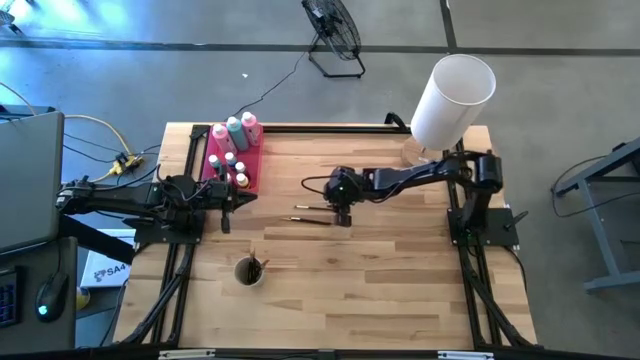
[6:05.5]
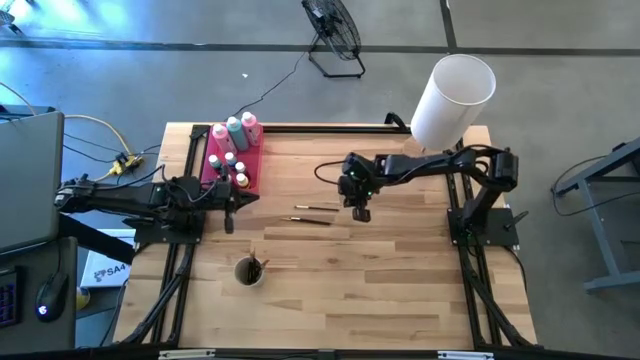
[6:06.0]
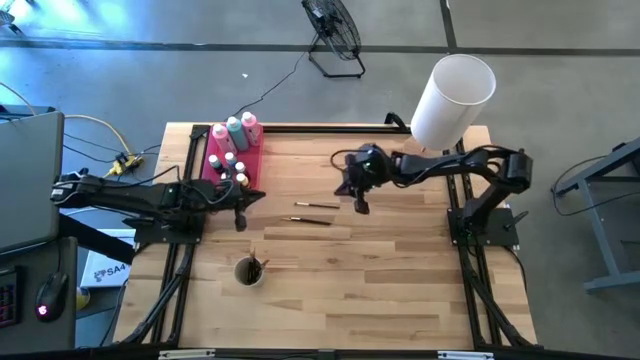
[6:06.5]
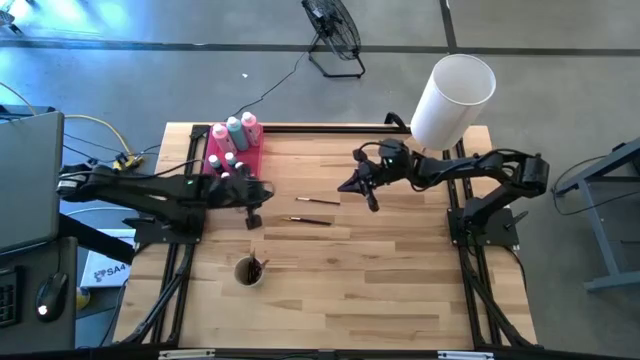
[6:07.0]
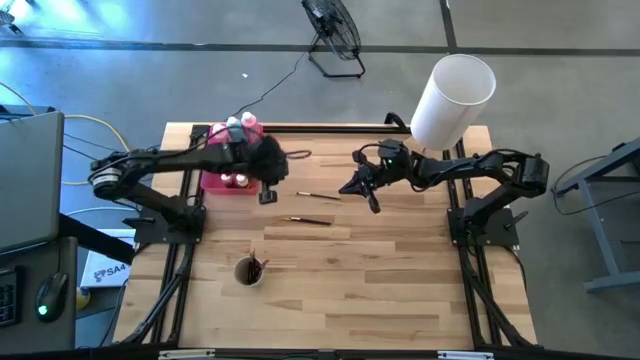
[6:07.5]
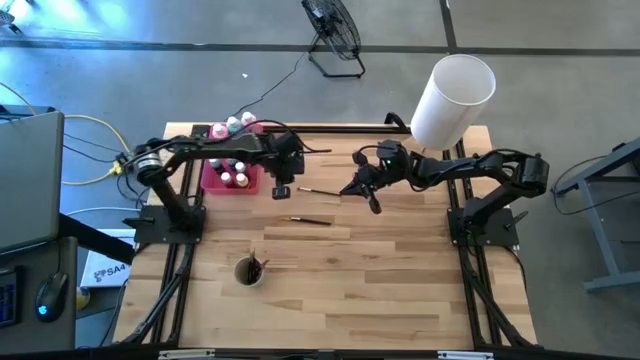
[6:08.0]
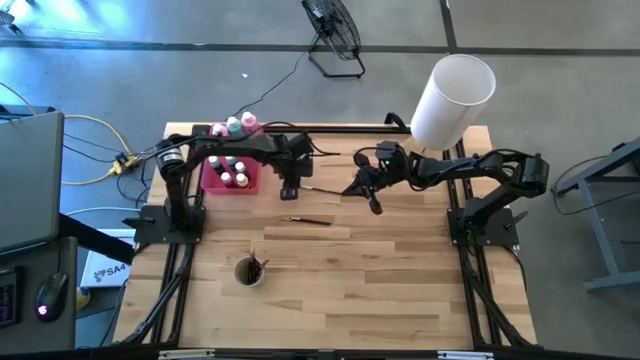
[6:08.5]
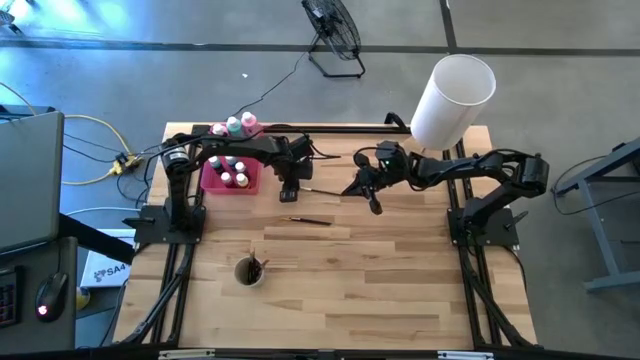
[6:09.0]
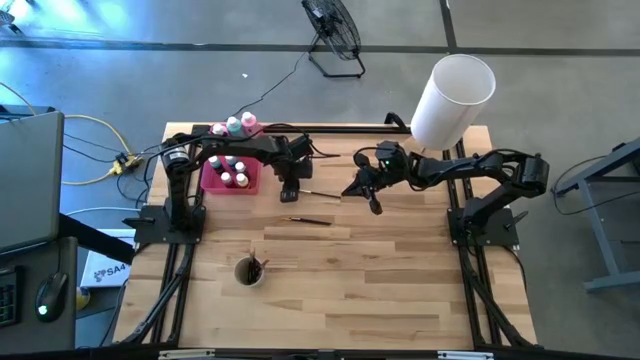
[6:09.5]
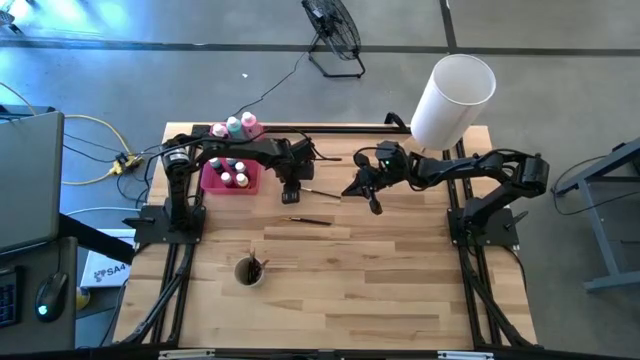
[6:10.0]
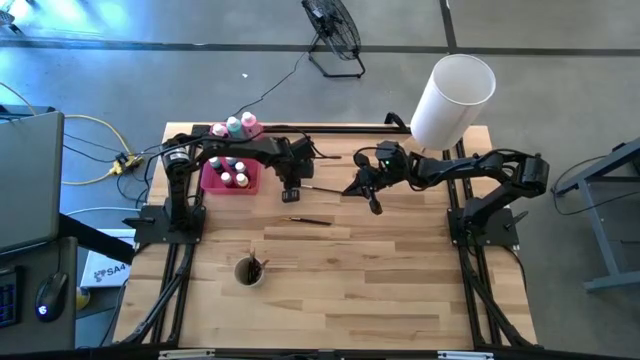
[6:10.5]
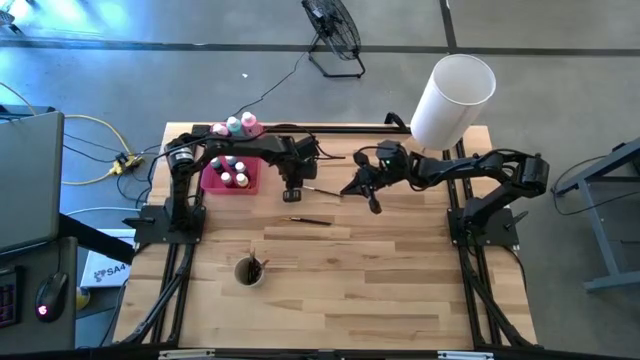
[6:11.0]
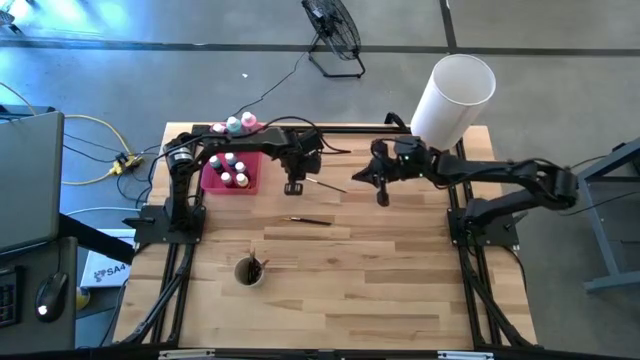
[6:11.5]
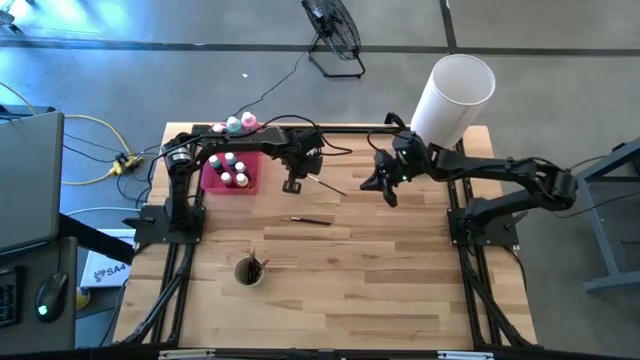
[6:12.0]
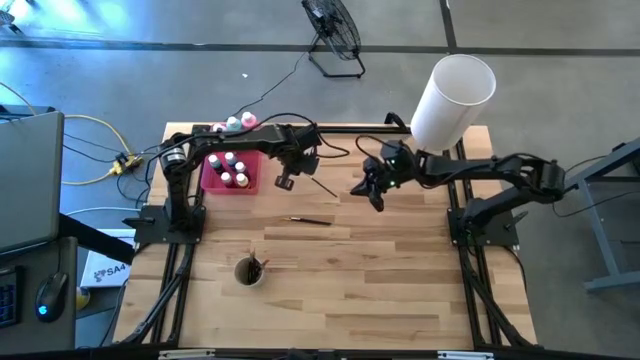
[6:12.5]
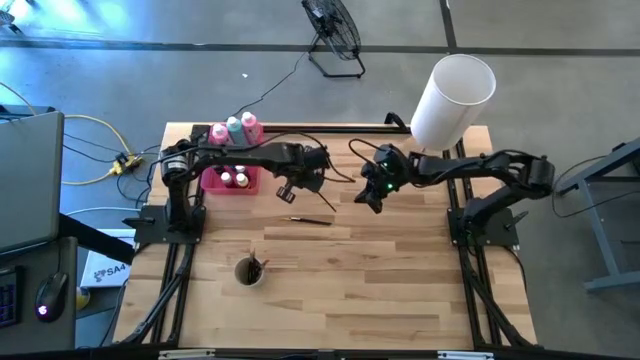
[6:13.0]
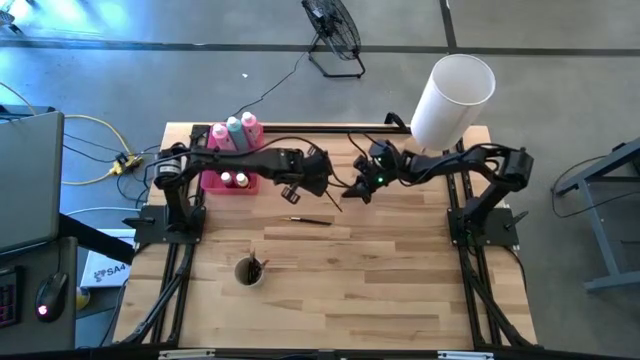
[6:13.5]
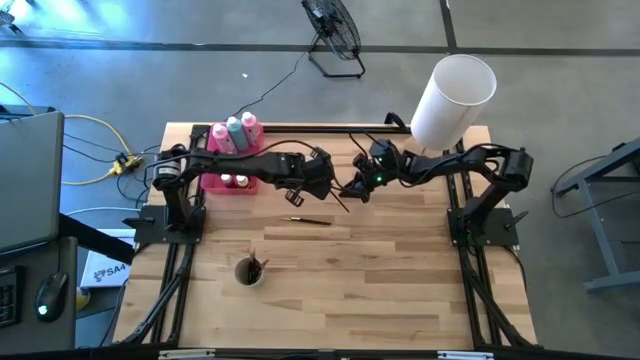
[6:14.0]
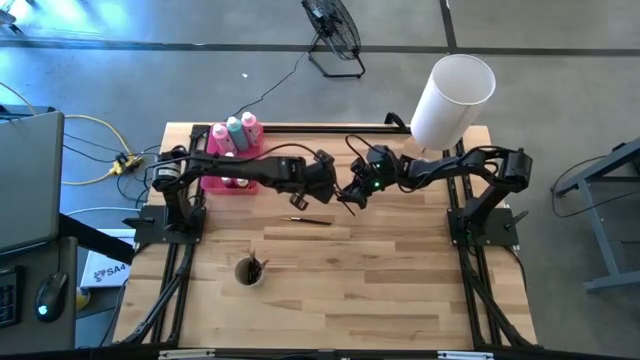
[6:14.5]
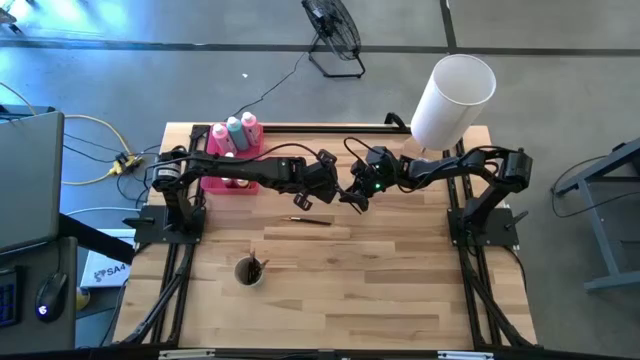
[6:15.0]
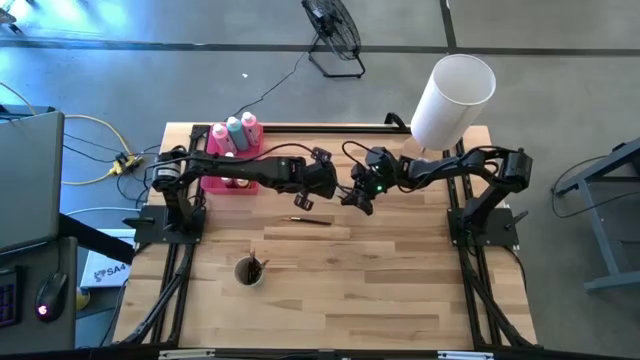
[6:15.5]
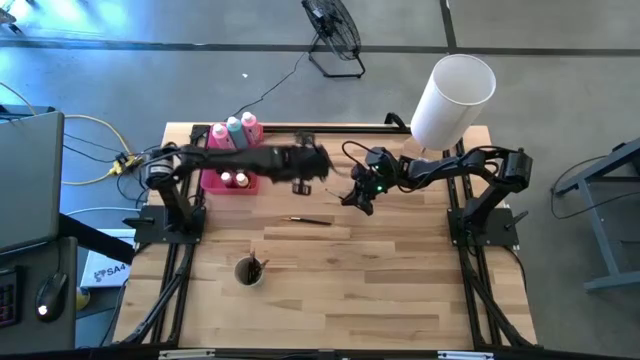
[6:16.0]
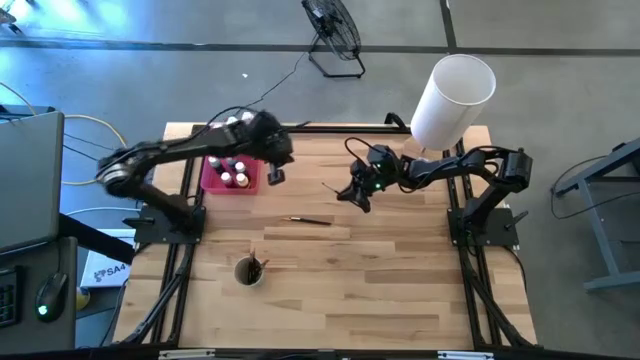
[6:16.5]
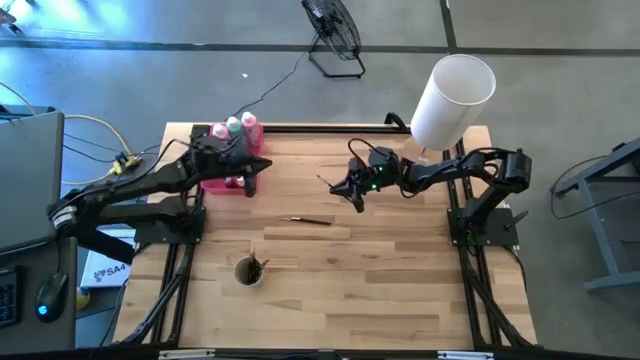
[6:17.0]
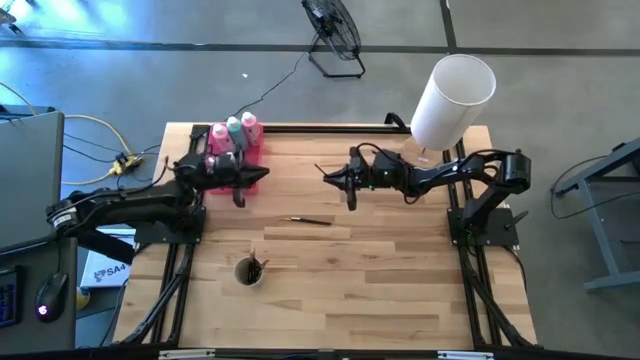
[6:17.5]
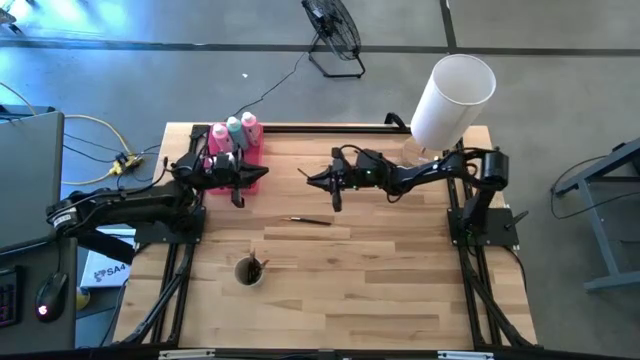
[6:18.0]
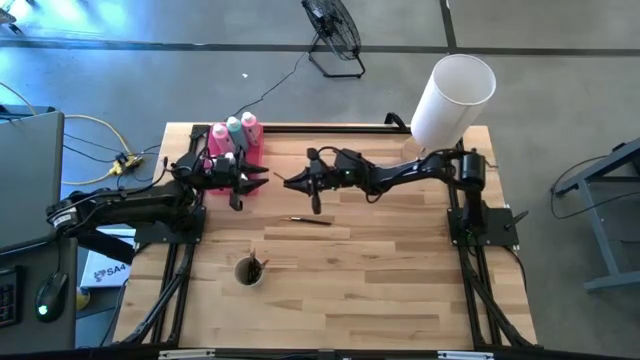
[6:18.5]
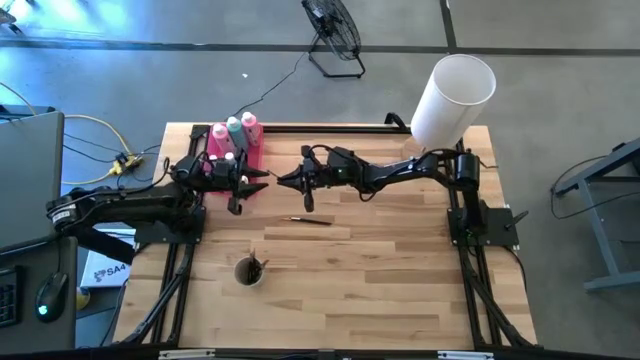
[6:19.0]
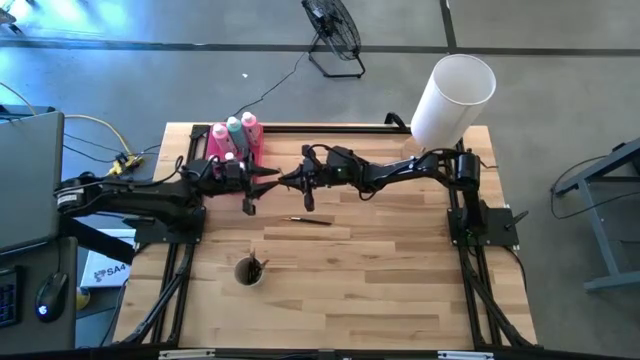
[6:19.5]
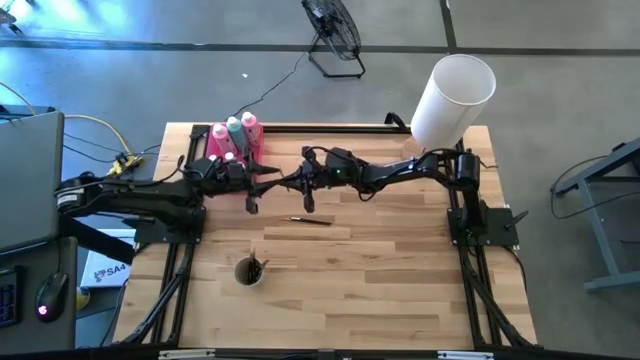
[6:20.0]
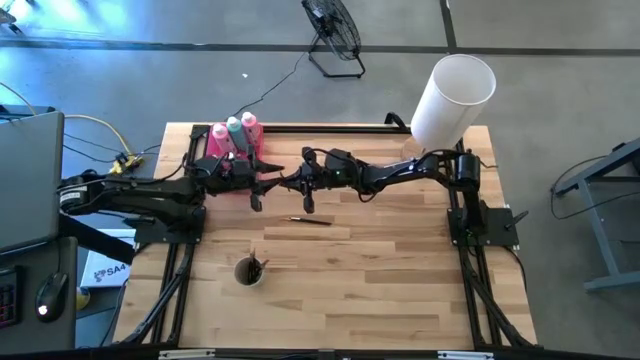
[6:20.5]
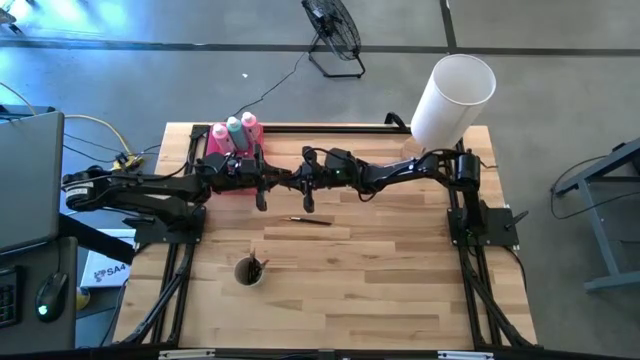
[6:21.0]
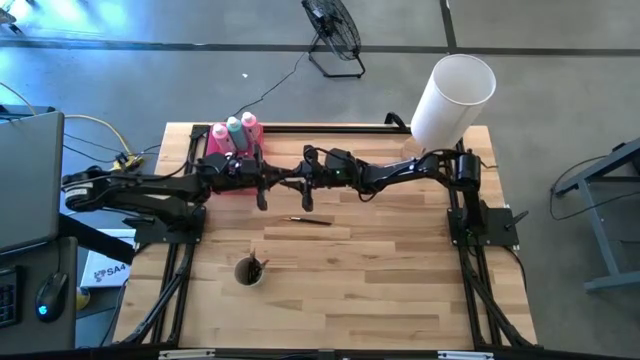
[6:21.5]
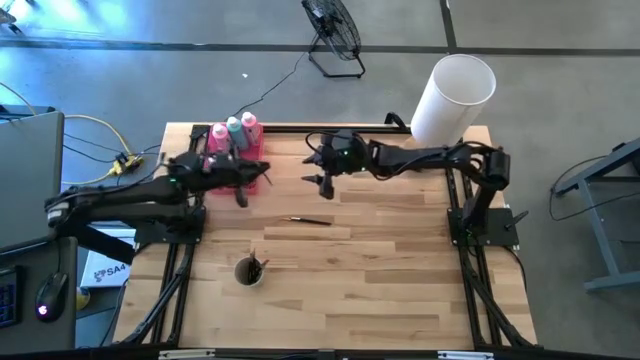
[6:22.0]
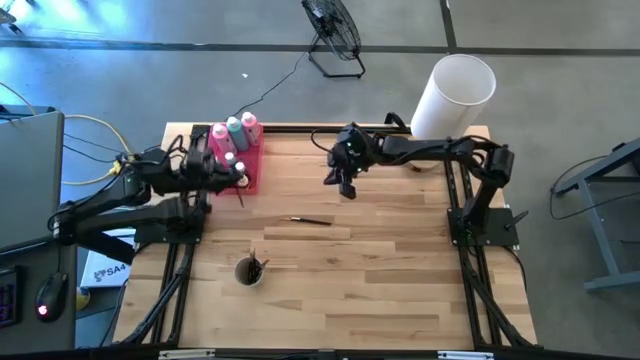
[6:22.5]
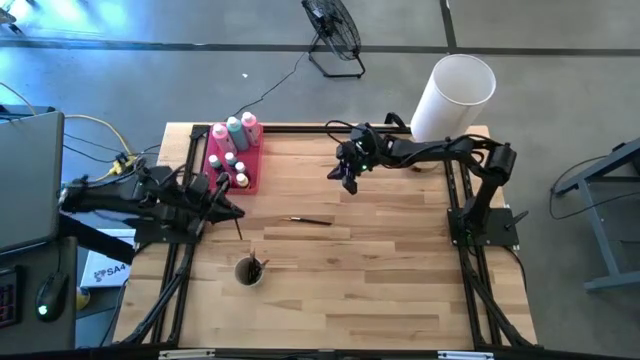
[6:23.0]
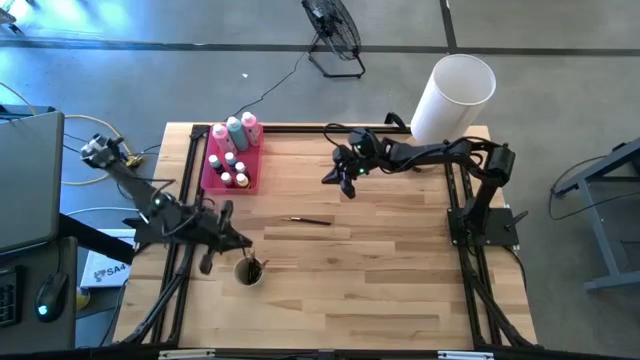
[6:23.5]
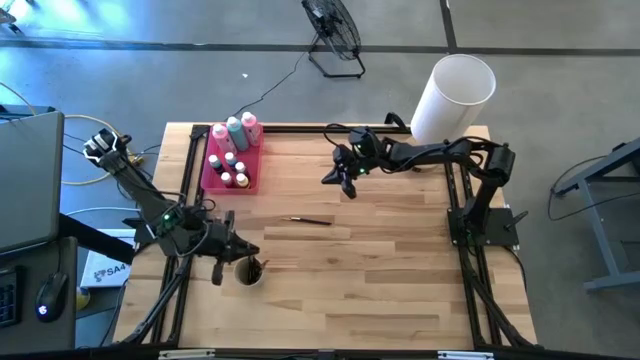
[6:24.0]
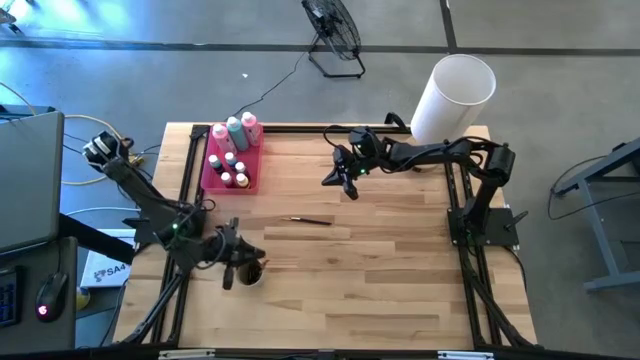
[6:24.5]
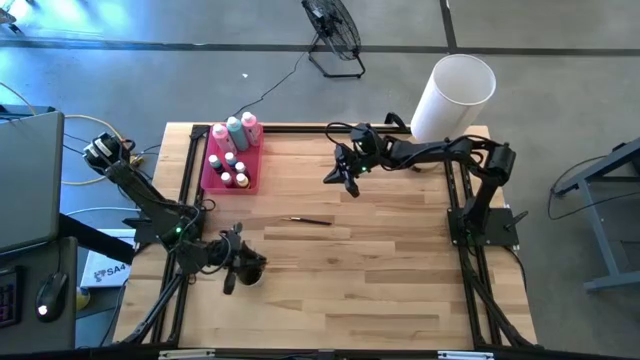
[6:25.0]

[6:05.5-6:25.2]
Task: Pick & Place Paint Supplies
Put the silver paintbrush into the light brown cup
